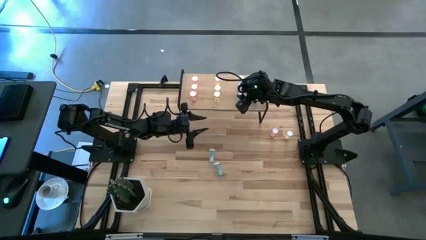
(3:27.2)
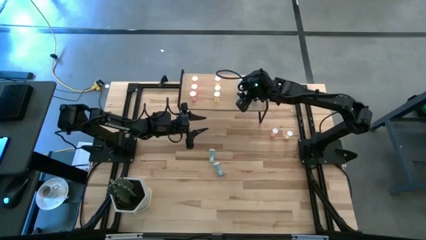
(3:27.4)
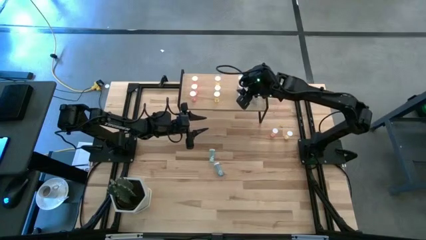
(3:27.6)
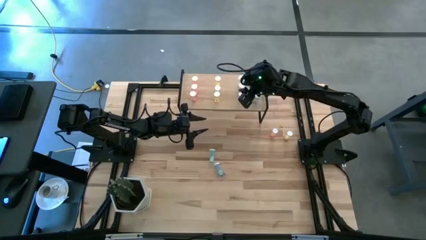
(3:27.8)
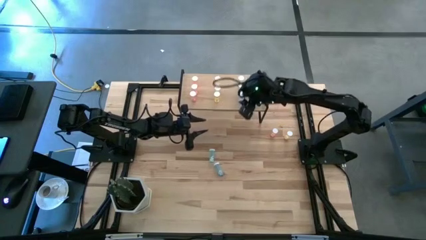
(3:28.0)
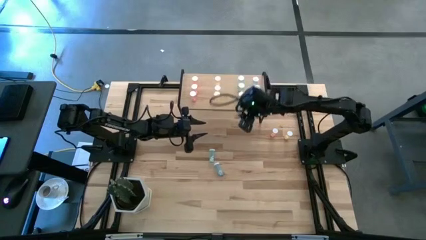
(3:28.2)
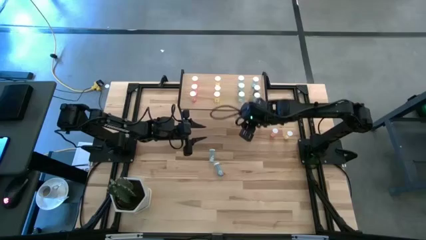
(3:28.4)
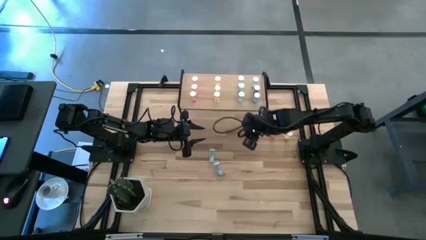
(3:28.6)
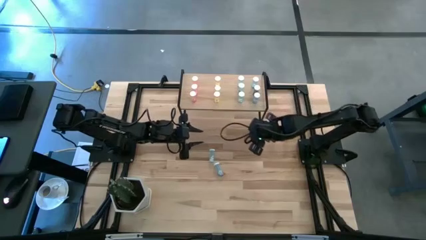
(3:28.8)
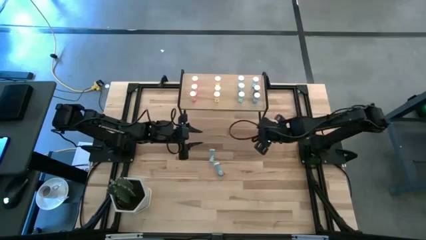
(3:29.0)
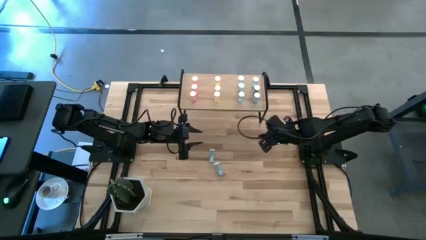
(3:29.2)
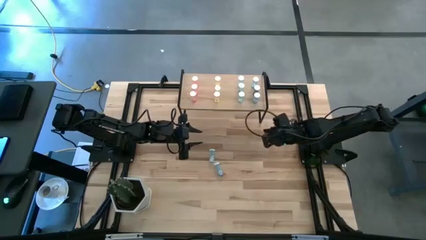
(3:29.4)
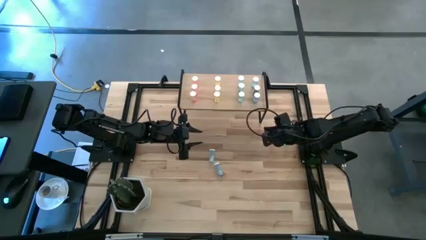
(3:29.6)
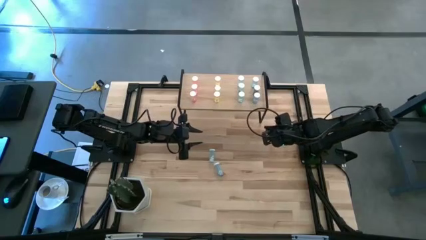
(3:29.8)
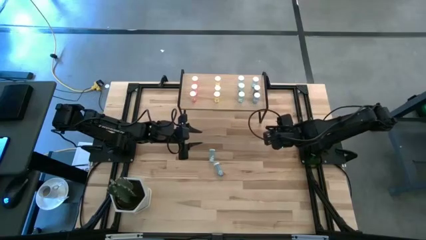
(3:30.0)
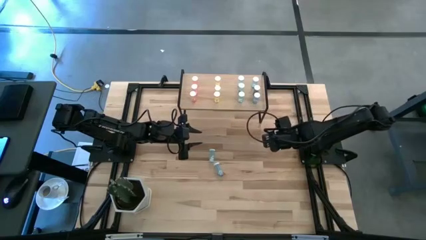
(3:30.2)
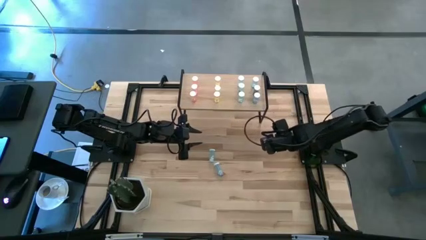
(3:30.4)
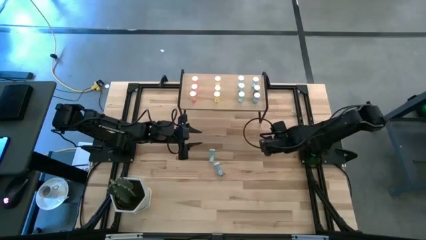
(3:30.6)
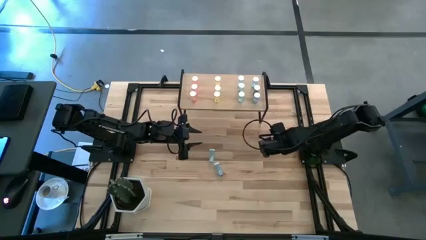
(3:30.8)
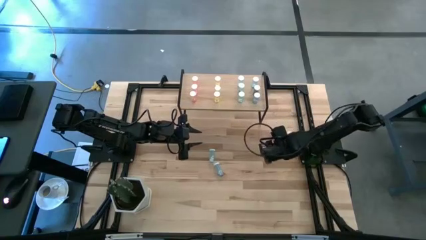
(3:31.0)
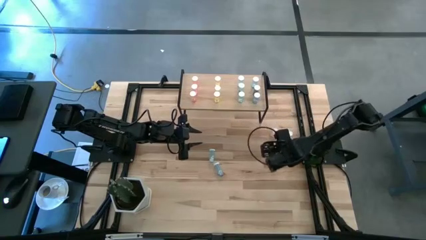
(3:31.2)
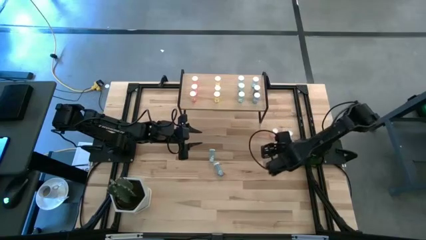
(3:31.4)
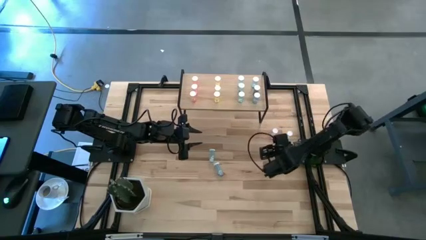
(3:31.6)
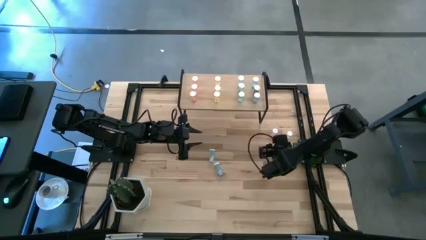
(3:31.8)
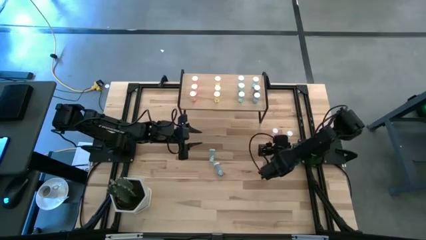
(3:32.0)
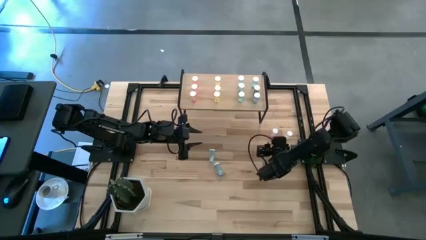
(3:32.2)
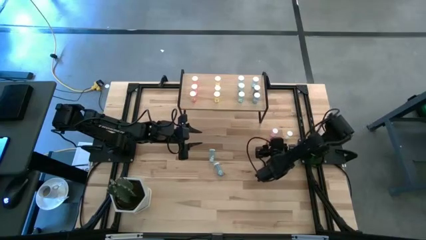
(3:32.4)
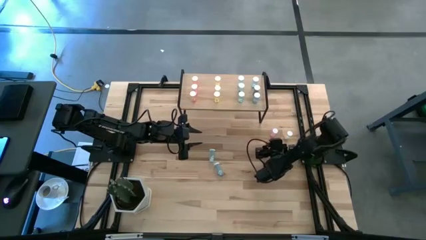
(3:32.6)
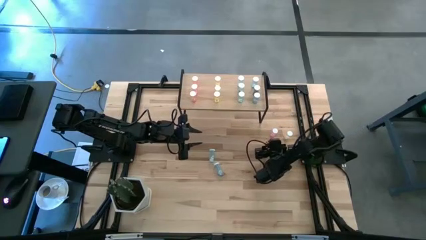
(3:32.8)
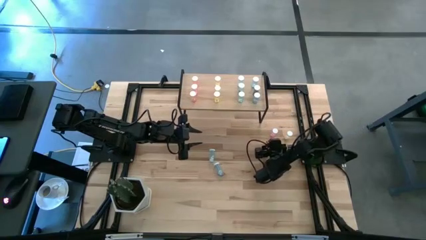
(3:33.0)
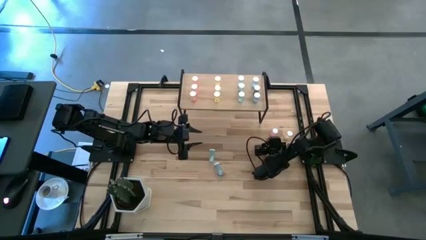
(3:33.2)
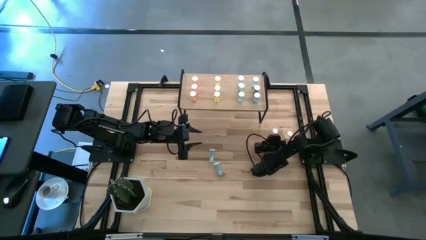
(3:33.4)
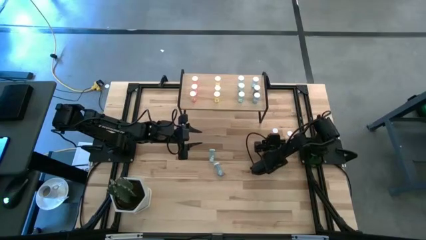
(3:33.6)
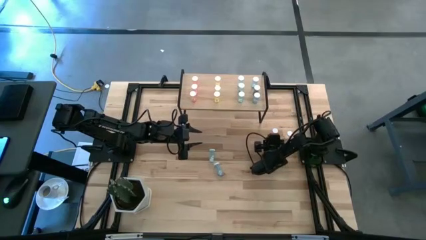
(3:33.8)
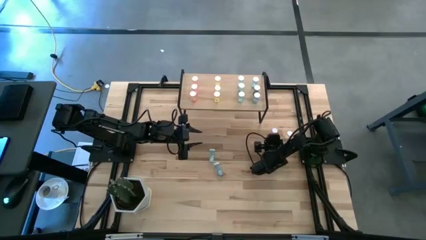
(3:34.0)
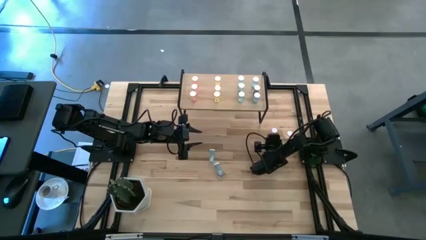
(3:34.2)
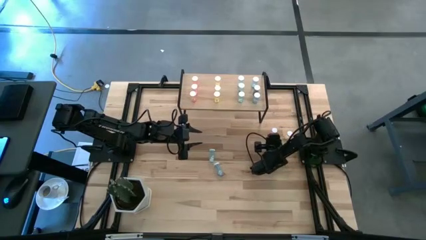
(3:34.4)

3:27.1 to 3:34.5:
Task: Pick and place medicine bottles onto shelf by color
Put the pink pill bottle on the shelf aligned with the other pink pill bottles

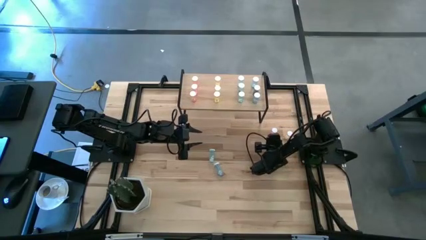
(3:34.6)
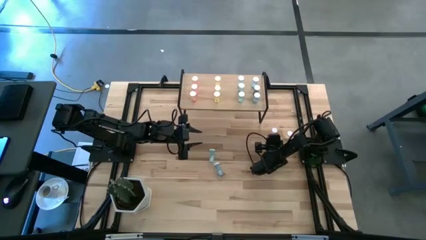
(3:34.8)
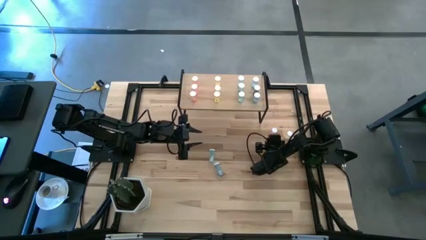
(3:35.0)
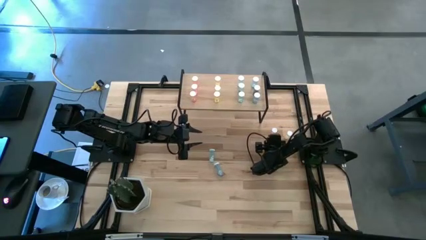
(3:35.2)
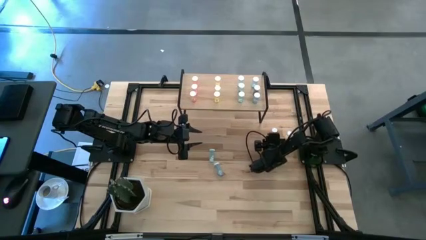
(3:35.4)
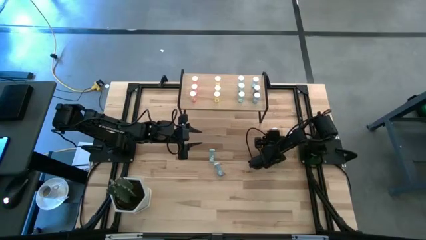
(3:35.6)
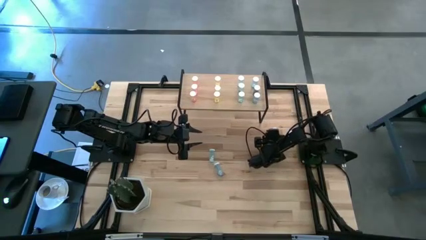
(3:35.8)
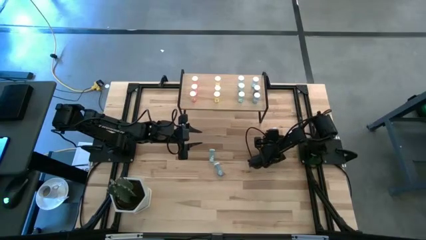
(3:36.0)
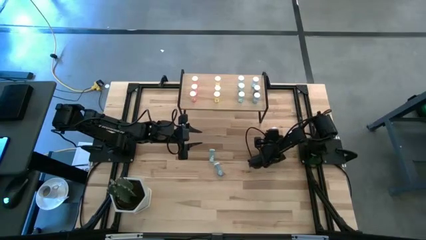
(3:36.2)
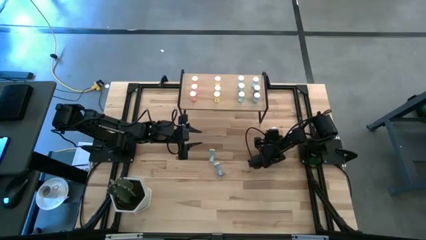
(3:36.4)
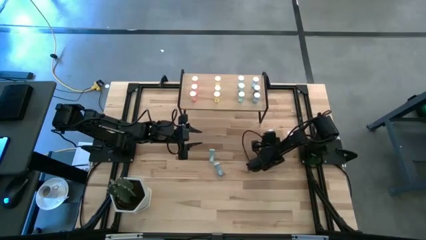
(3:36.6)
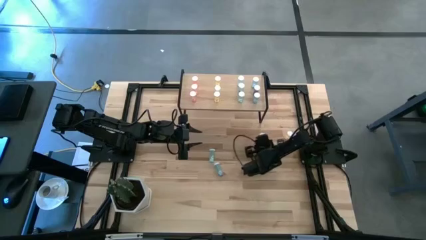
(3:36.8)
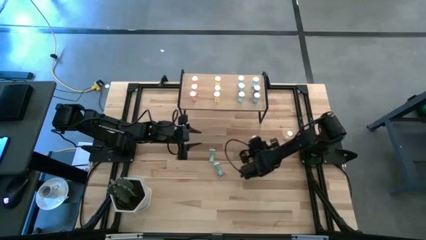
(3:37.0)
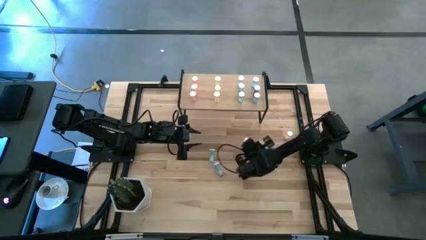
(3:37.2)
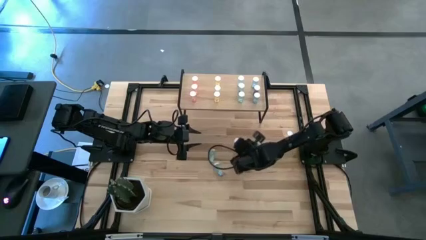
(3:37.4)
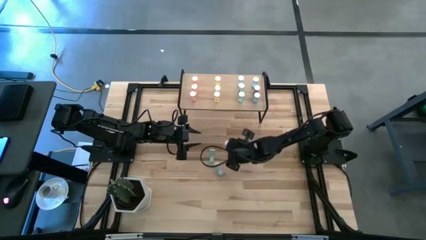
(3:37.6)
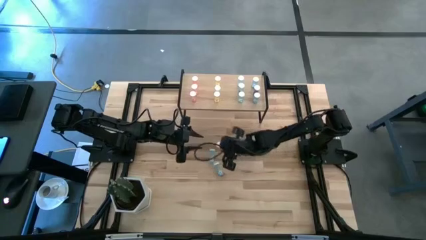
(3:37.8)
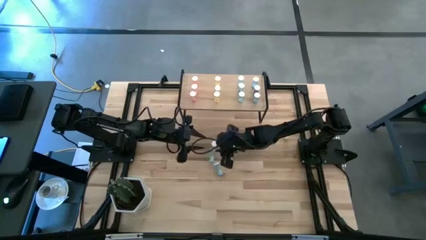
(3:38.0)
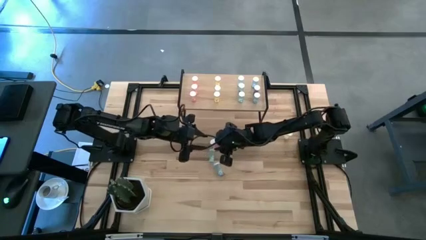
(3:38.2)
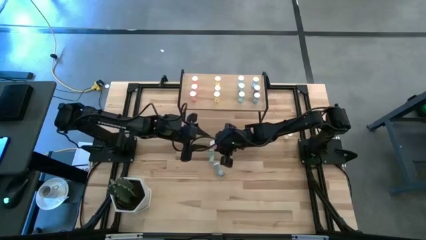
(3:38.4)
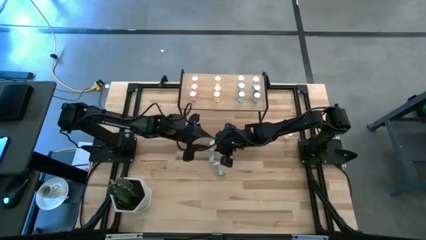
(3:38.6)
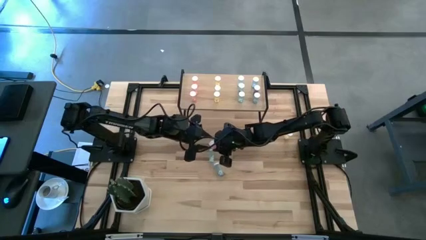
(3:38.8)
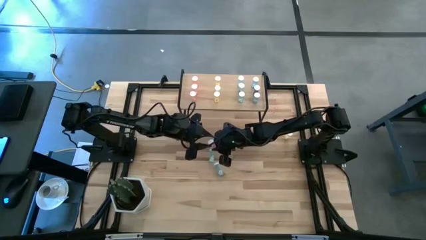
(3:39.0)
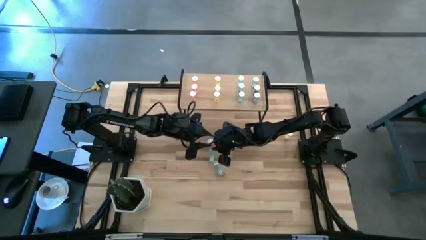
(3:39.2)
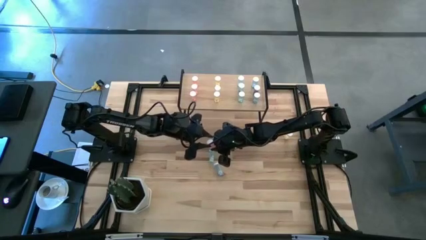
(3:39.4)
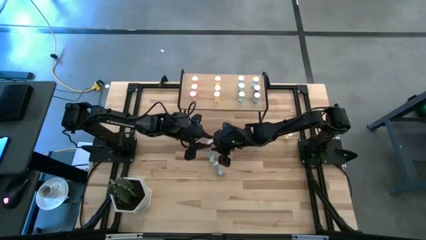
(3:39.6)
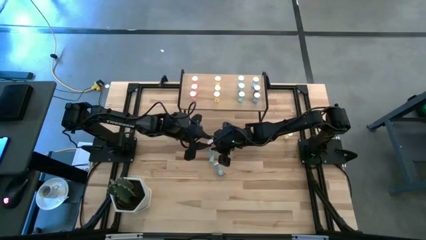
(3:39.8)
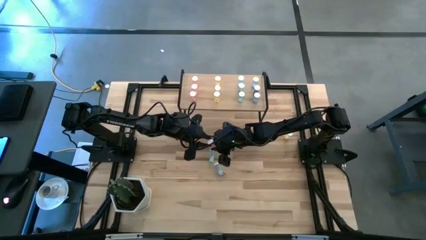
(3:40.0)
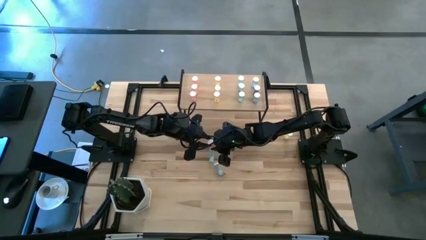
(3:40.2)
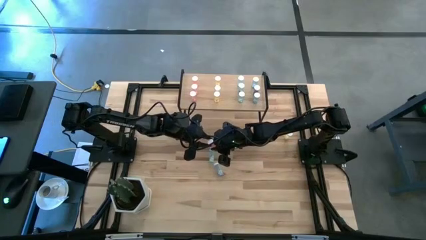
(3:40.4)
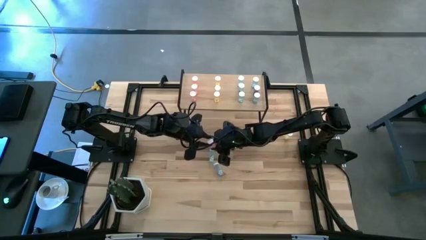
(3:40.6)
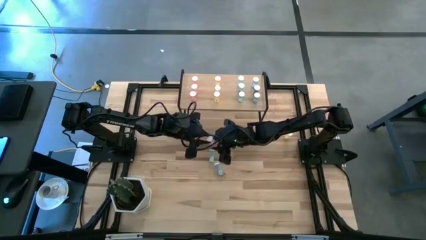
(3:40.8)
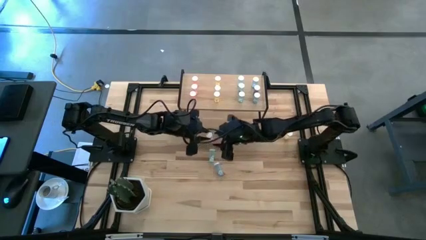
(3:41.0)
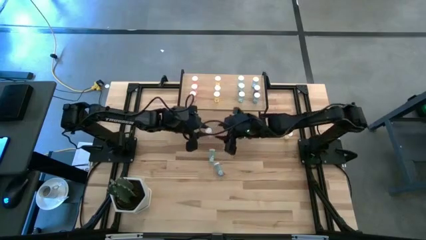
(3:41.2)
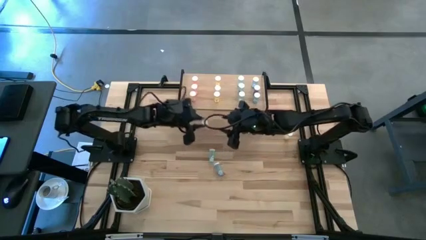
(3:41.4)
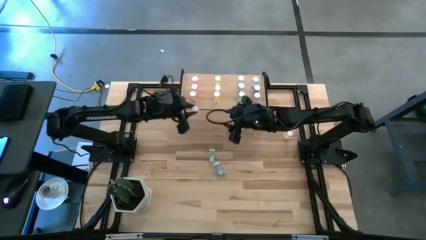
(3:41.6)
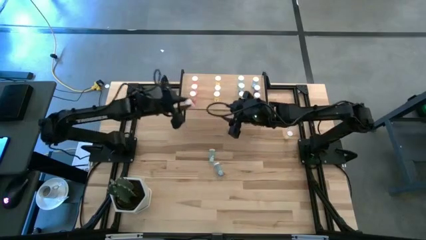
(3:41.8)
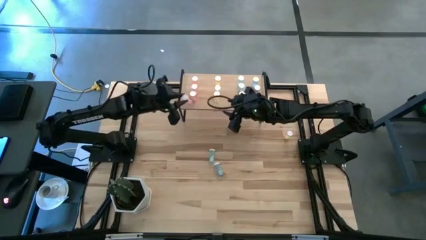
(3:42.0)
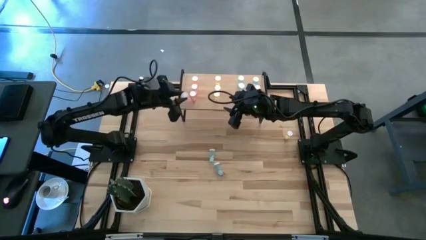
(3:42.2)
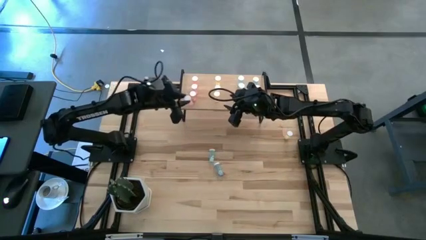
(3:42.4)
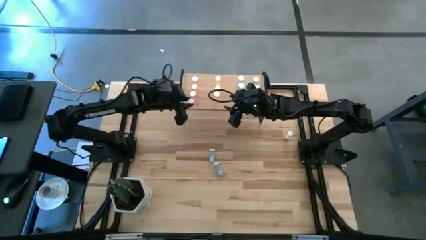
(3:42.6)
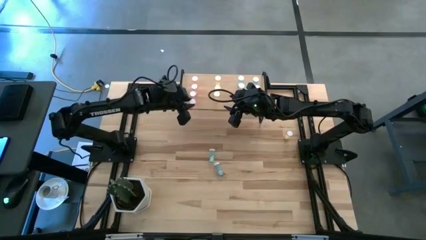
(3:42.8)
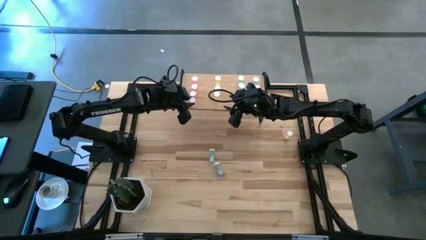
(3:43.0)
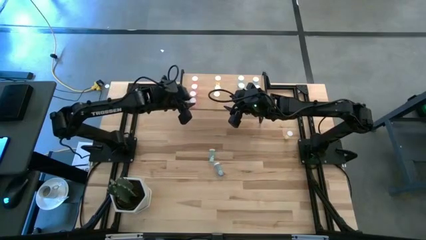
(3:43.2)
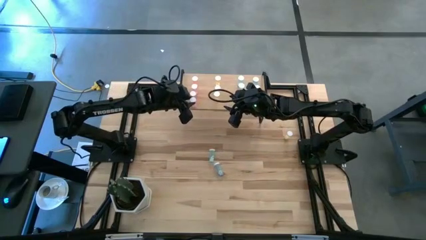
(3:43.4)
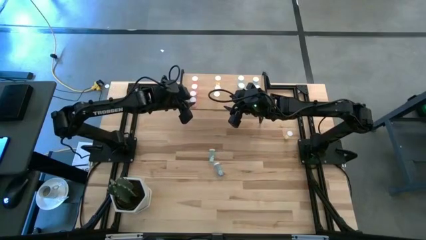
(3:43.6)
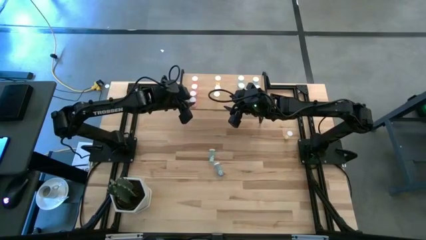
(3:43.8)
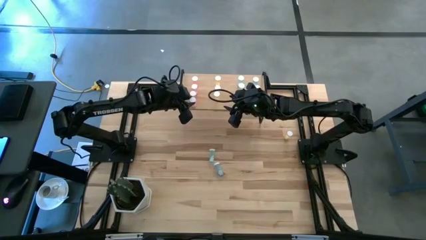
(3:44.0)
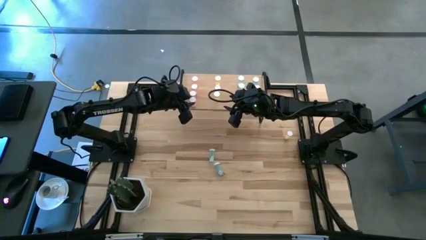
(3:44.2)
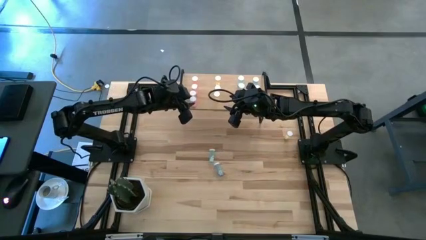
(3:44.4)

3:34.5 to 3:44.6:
Put the pink pill bottle on the shelf aligned with the other pink pill bottles
